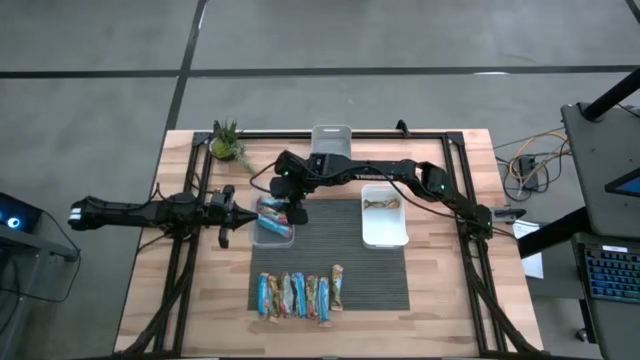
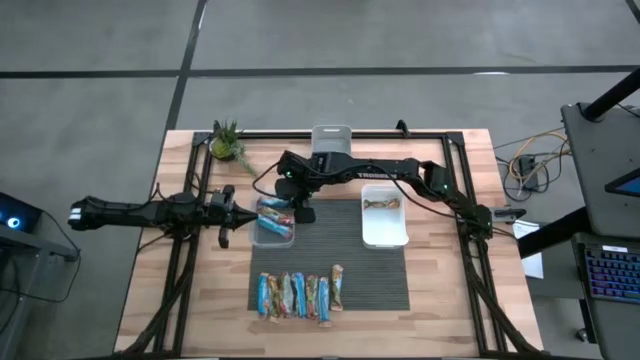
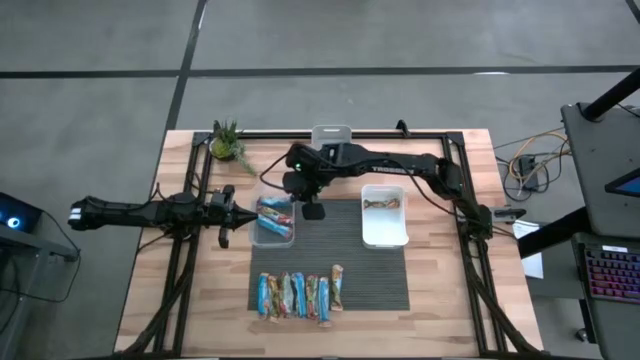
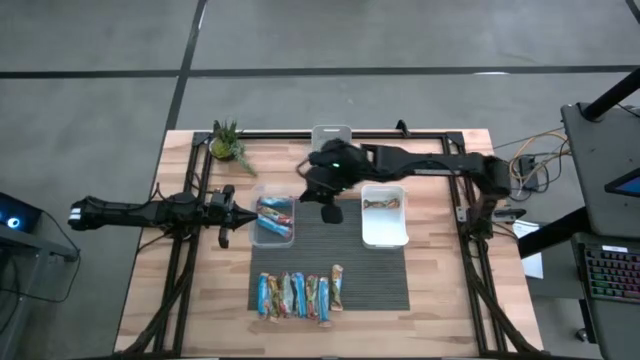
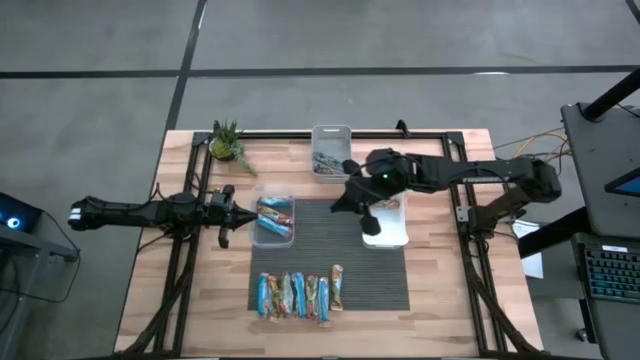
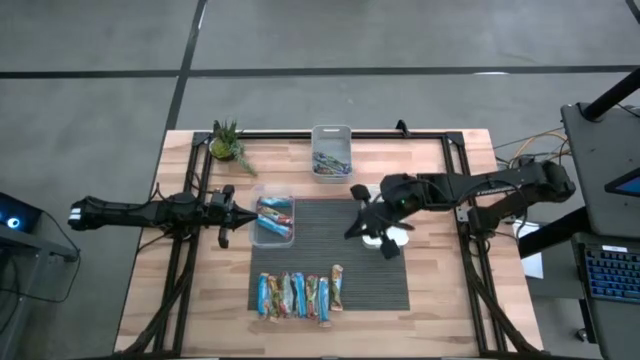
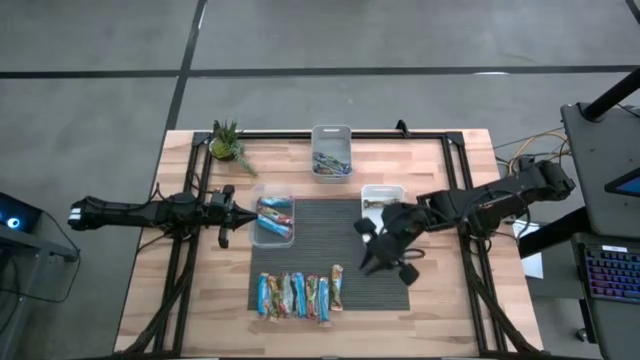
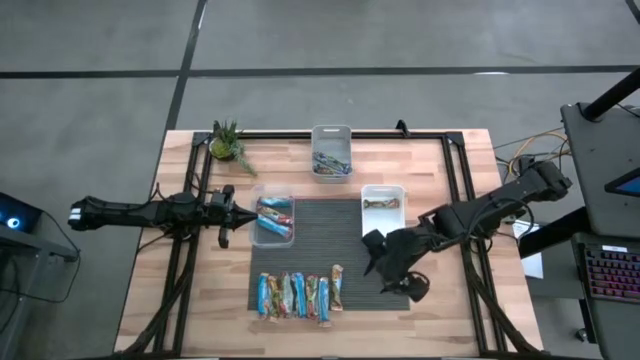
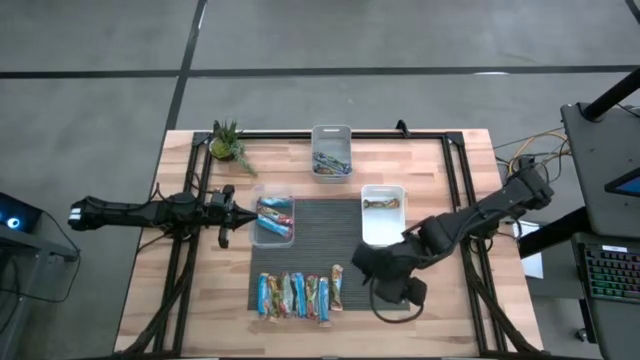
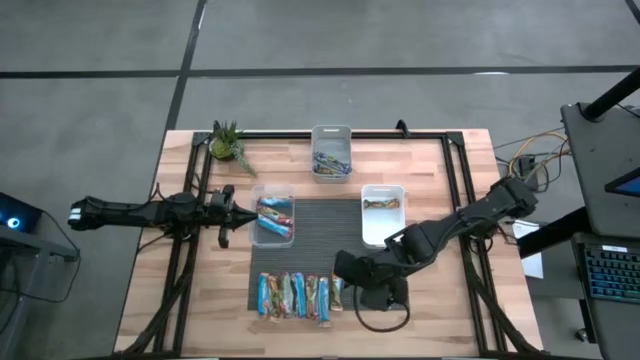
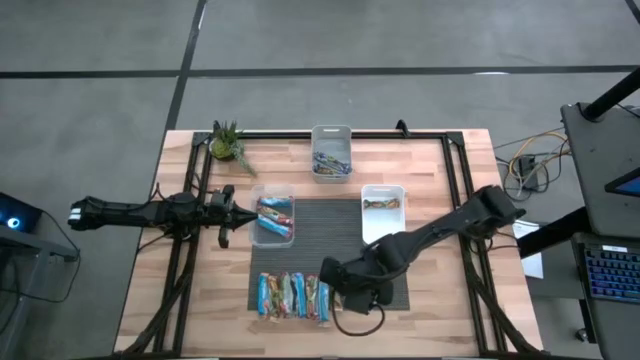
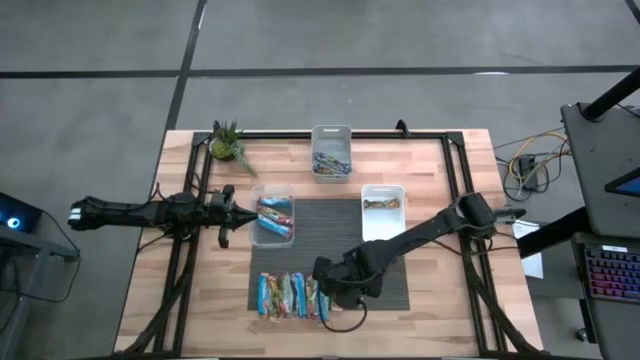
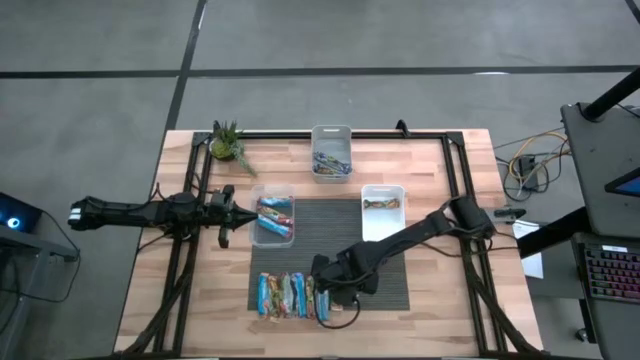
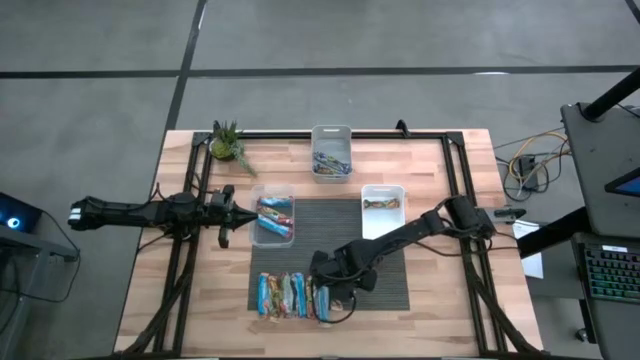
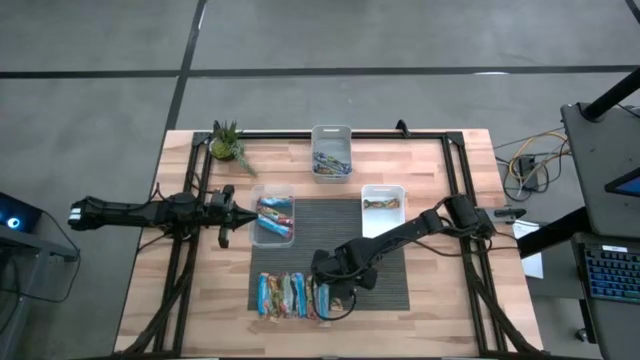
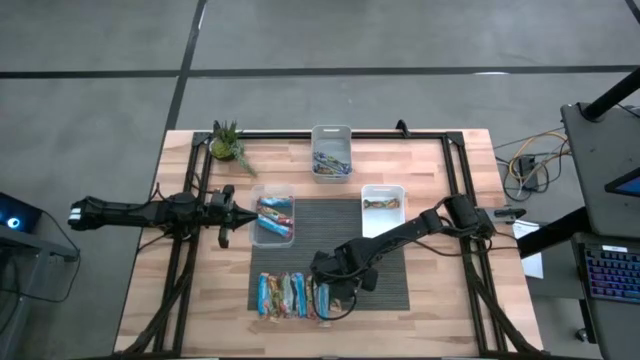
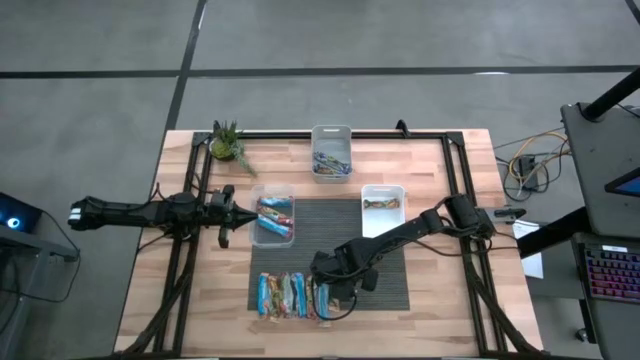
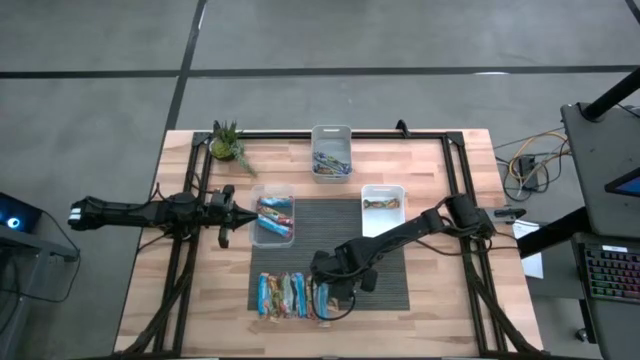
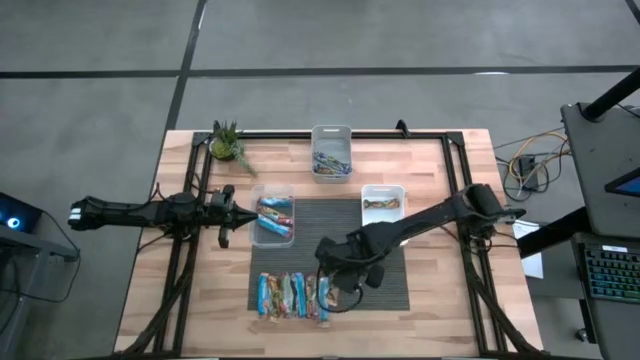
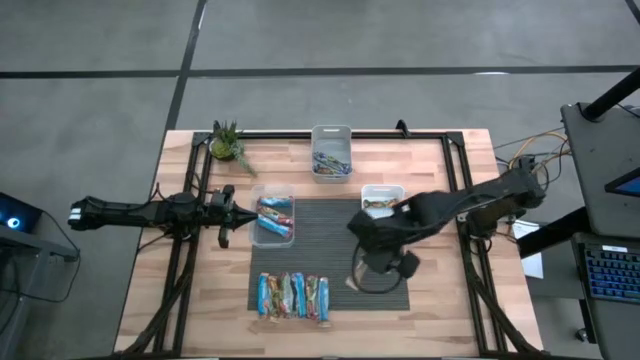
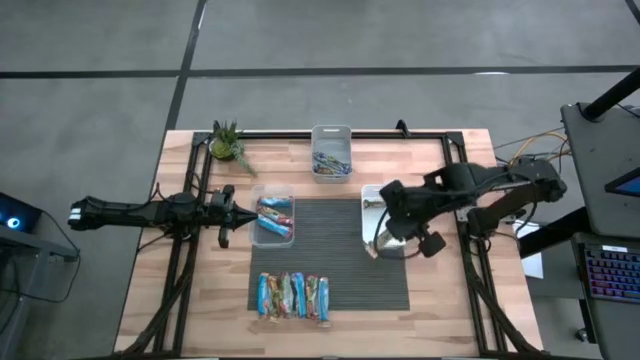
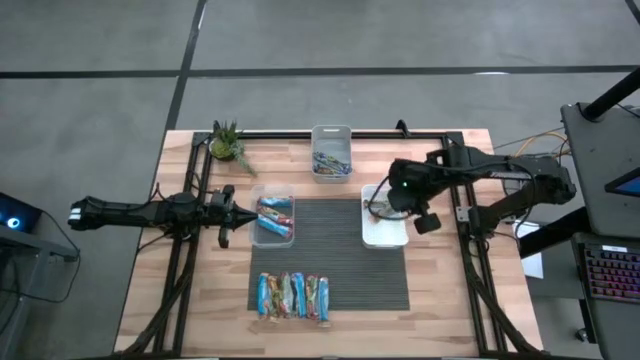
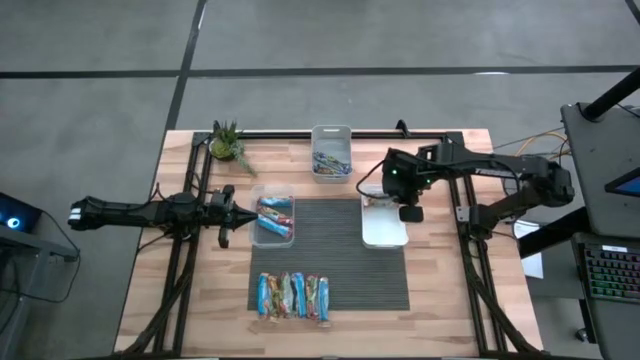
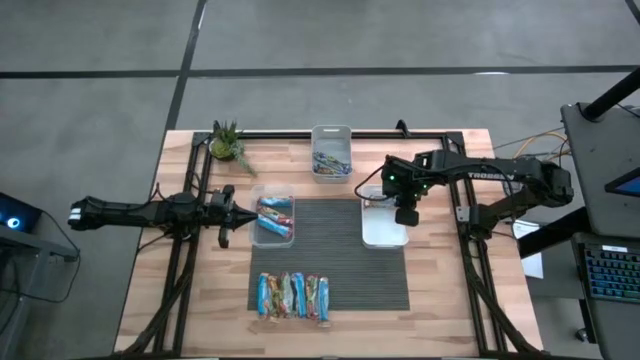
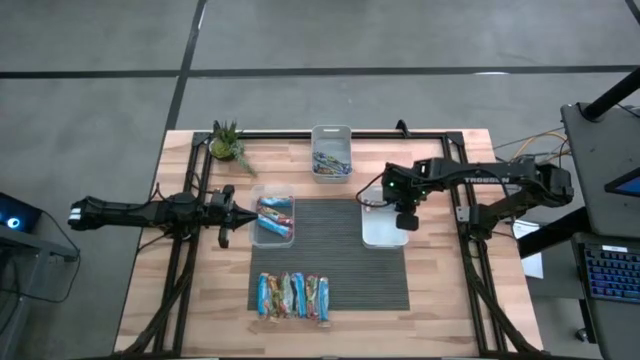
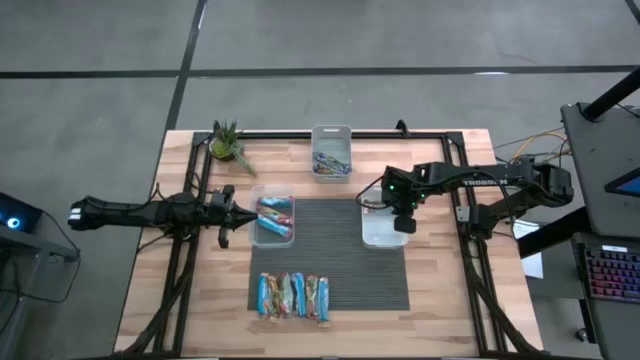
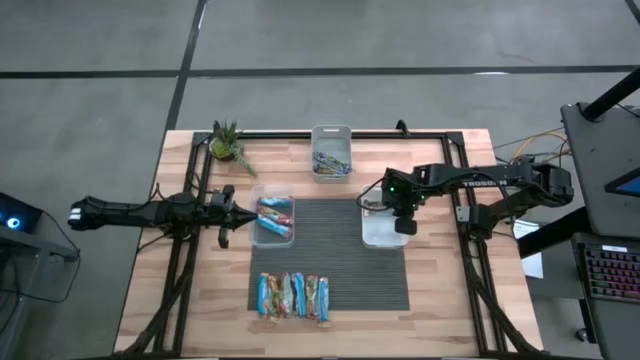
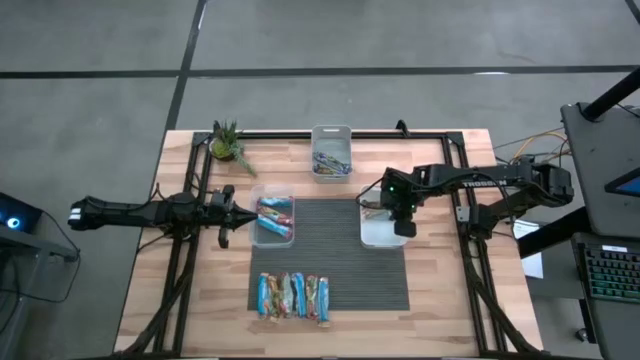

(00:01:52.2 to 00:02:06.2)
Task: Pick and place Granola Bars by type
Put the yellow granola bar into the white bin

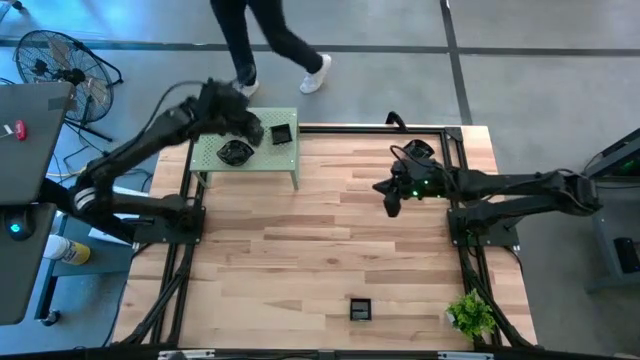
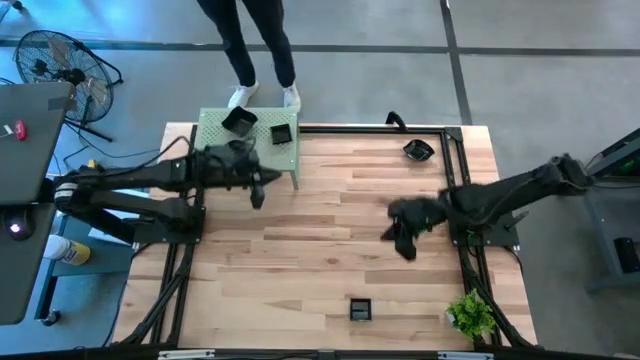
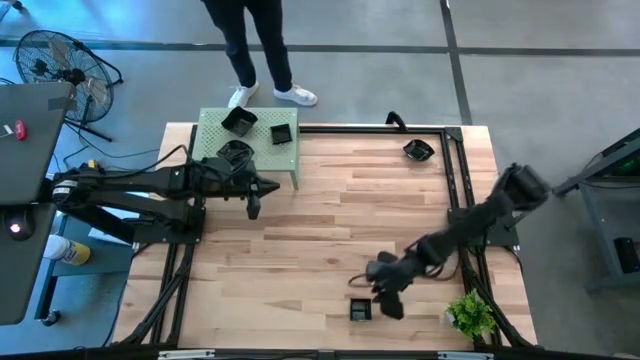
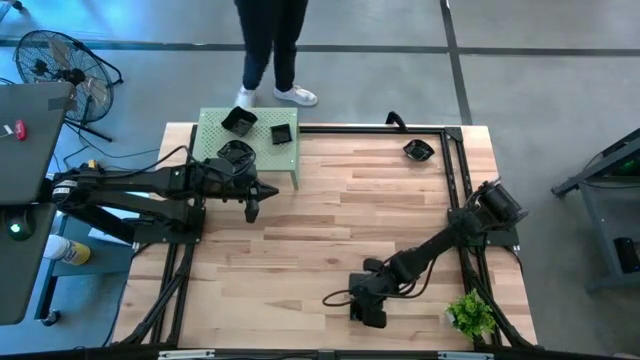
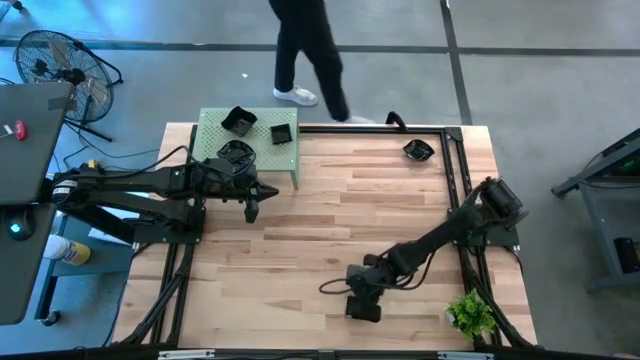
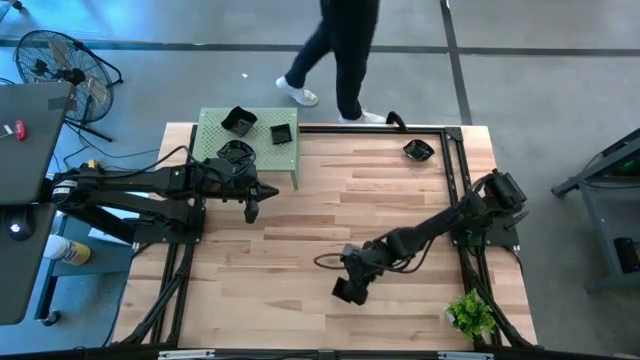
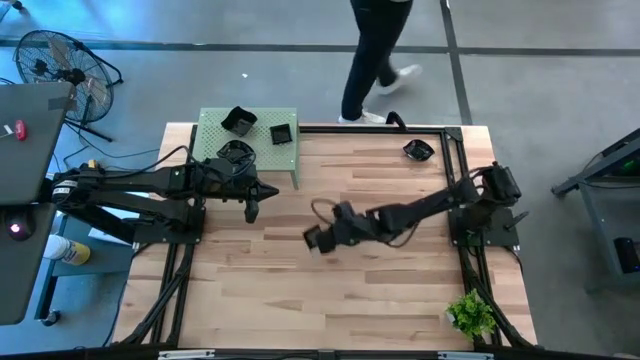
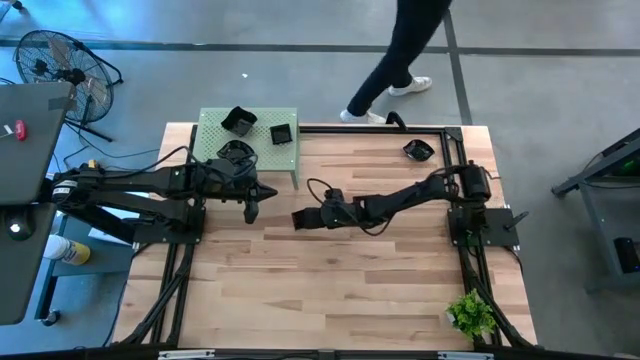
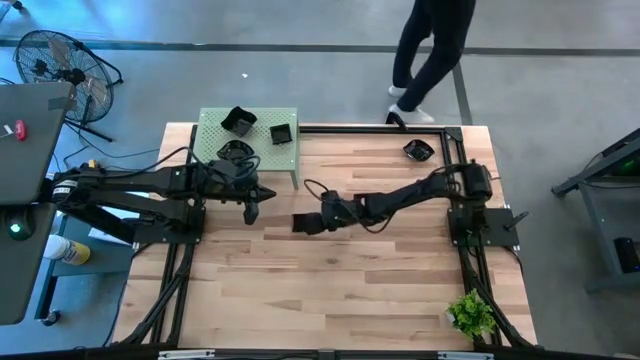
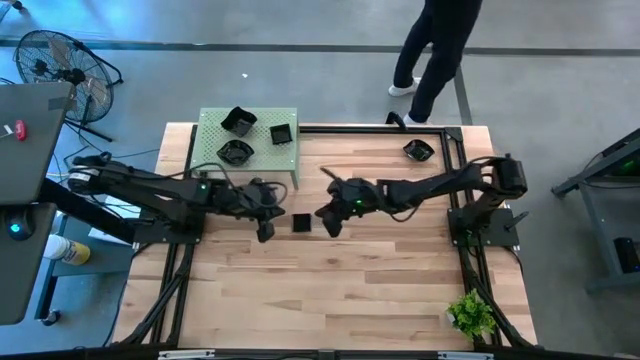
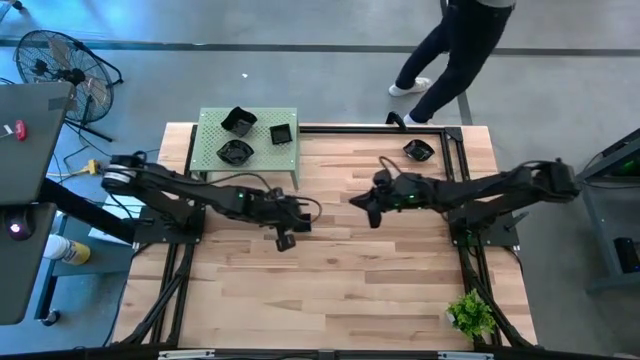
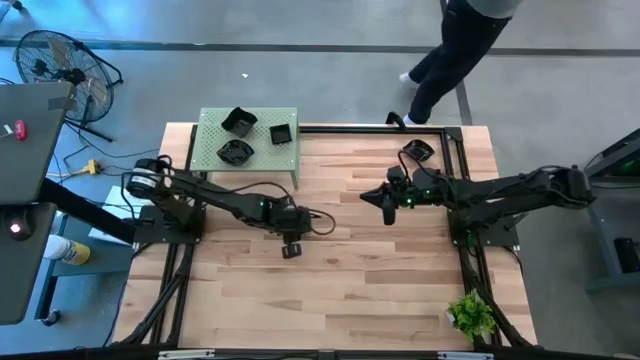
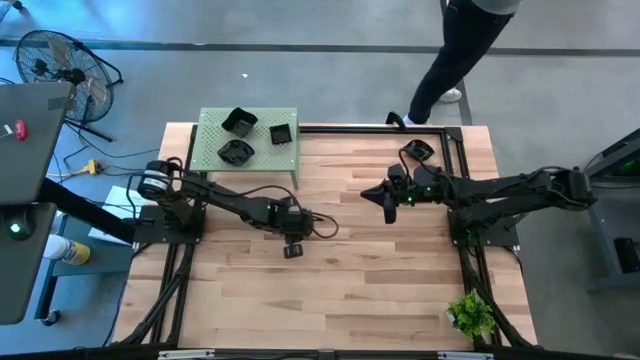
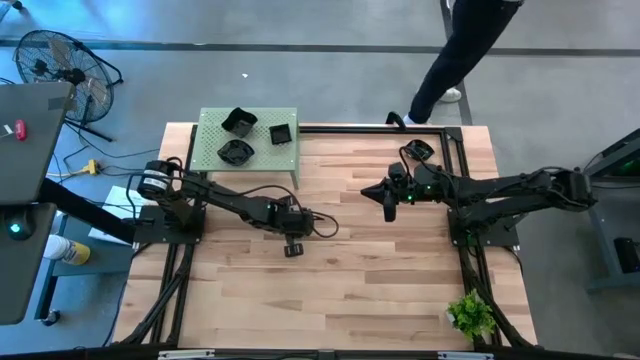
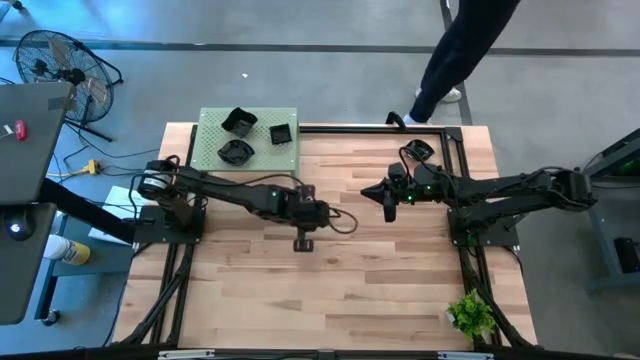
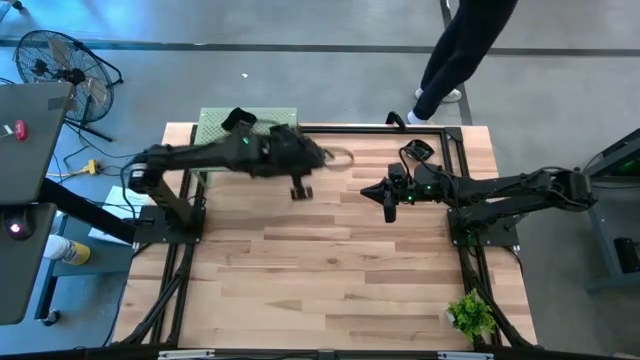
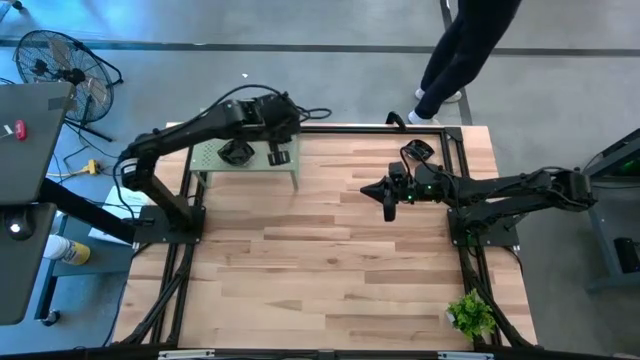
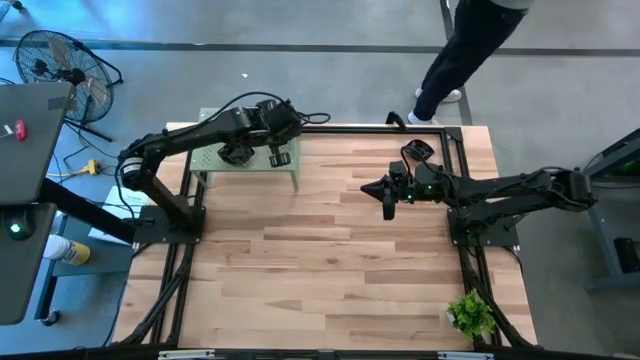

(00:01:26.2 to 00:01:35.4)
Task: Pick & Place Mini shaped plates
Stack the black square plate on the black square plate on the shelf
